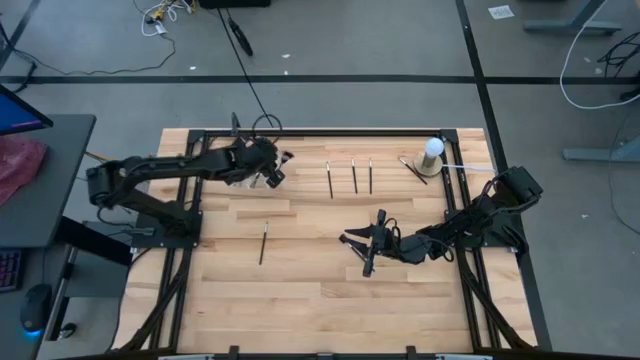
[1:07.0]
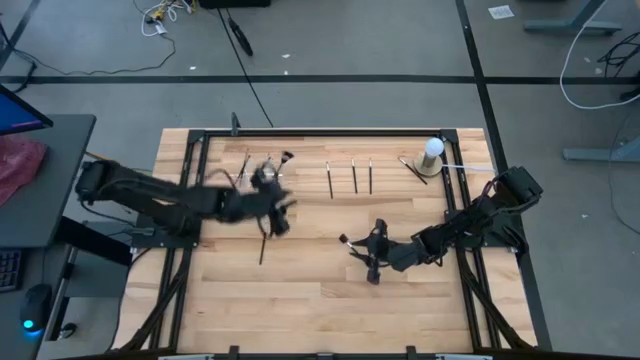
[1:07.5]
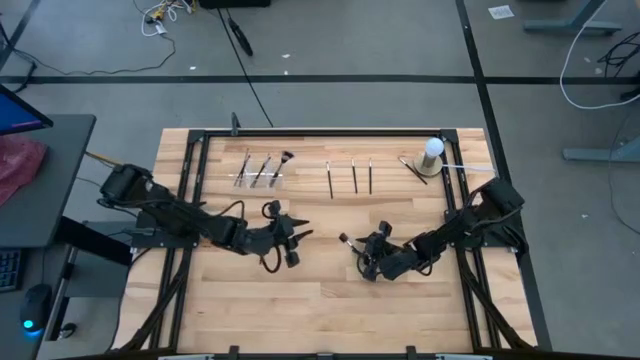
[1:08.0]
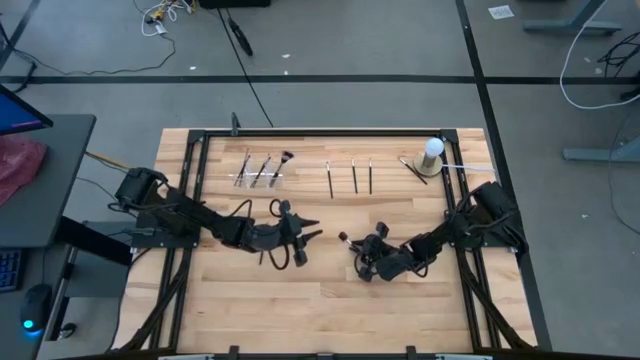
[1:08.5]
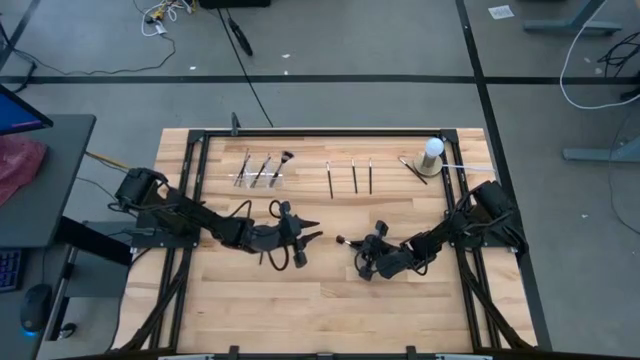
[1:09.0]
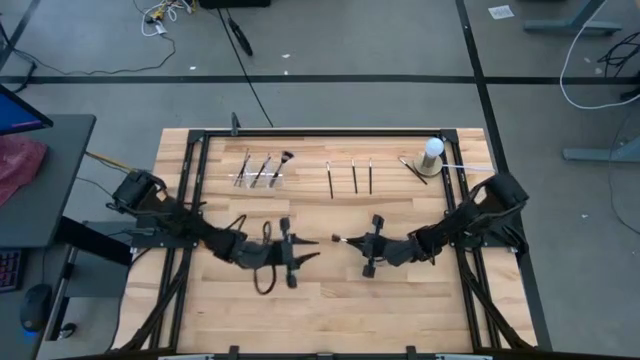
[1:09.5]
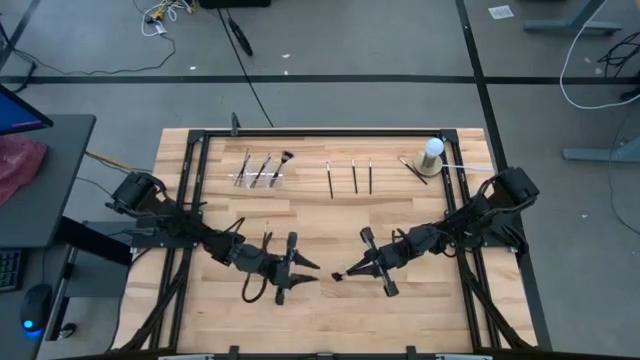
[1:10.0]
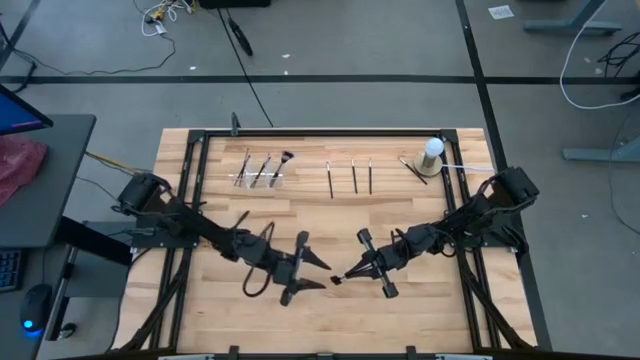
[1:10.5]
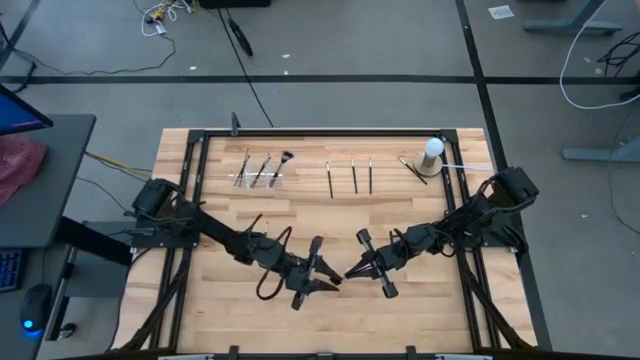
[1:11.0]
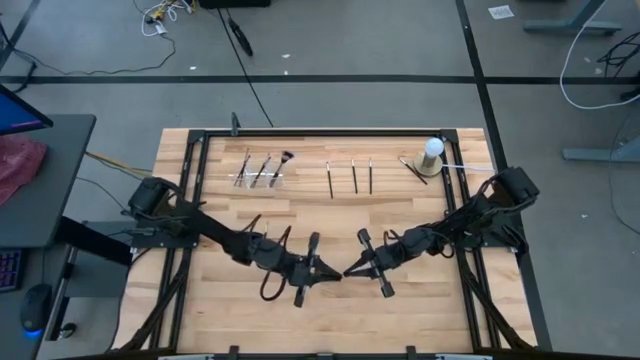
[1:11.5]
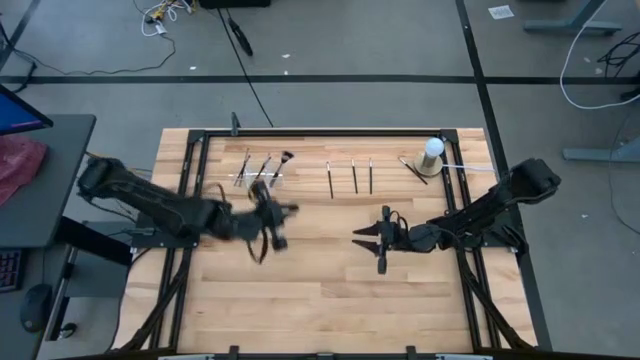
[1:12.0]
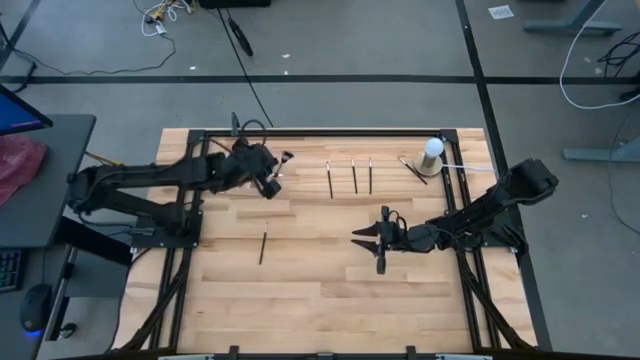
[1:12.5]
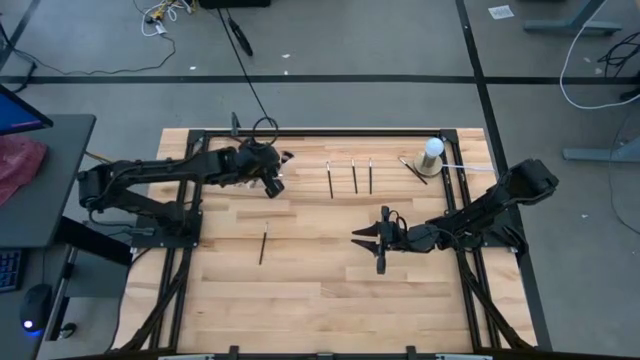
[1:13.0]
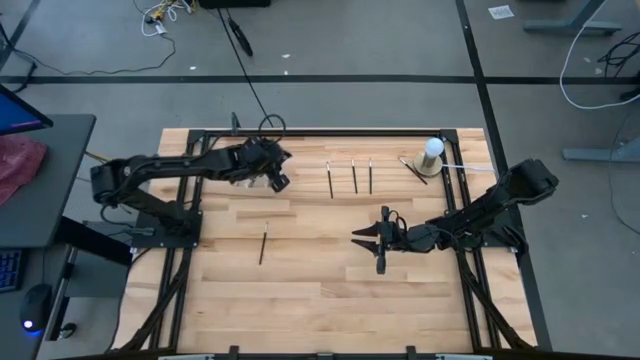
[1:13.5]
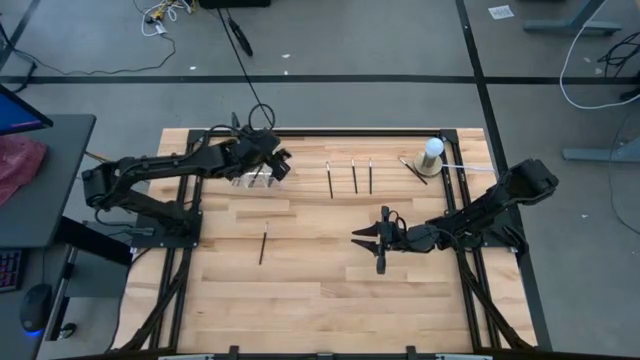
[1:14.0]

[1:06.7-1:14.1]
Task: Put items in baskets/containers
Put the brow brush into the transparent organizer

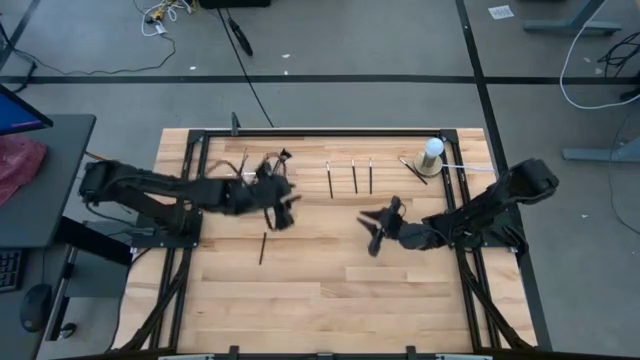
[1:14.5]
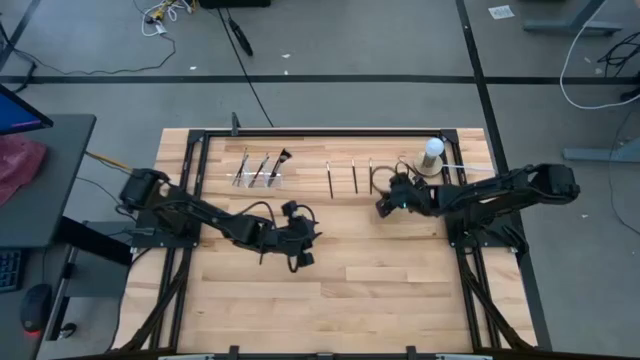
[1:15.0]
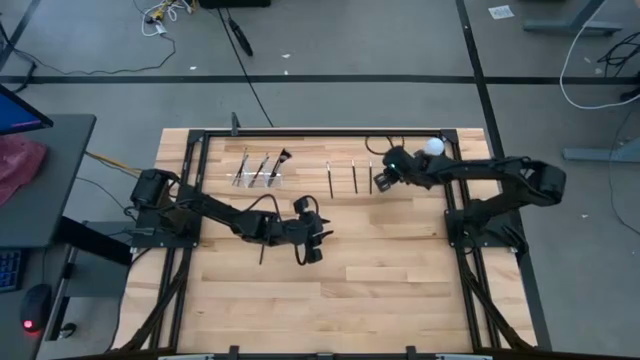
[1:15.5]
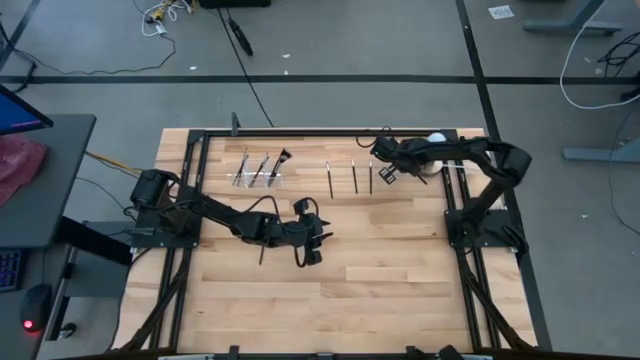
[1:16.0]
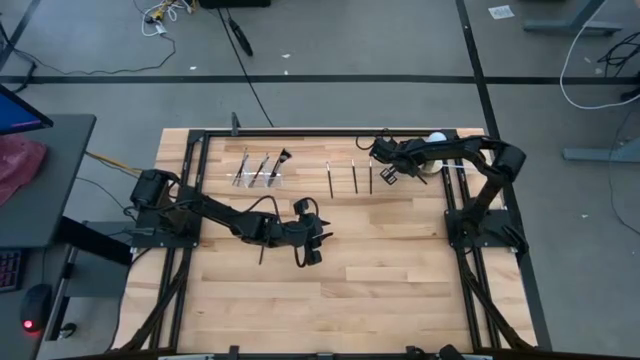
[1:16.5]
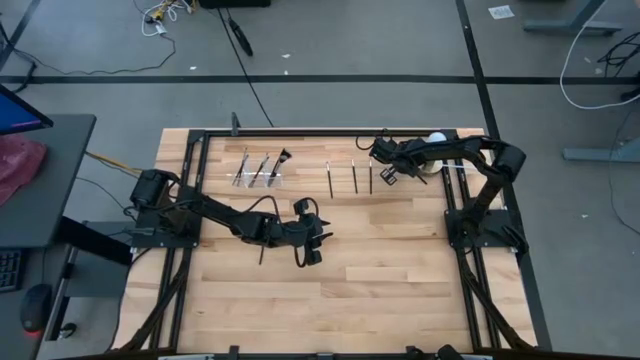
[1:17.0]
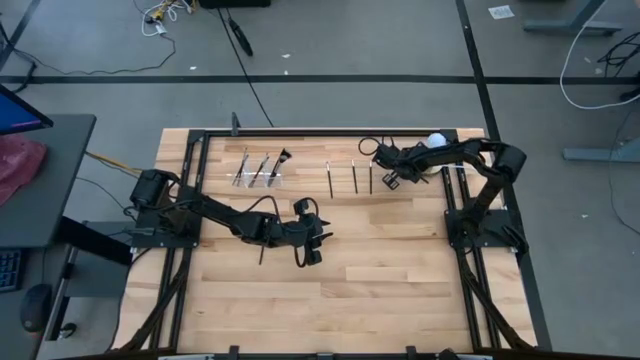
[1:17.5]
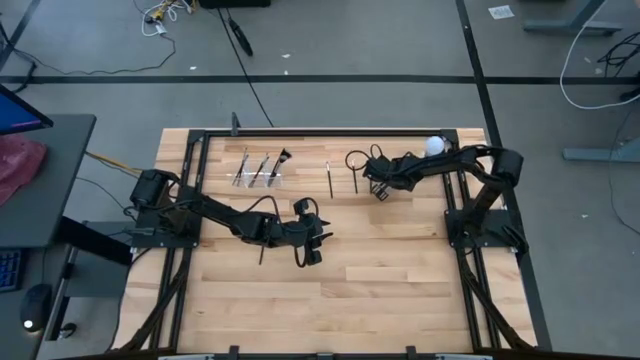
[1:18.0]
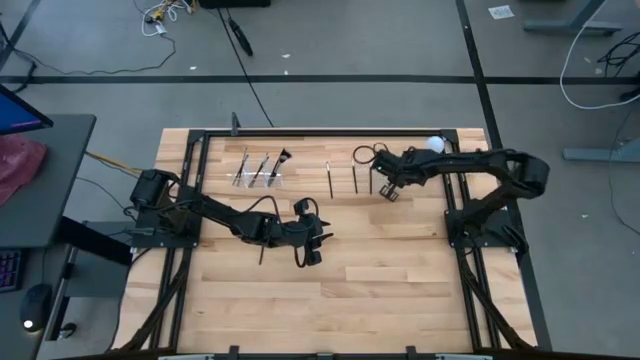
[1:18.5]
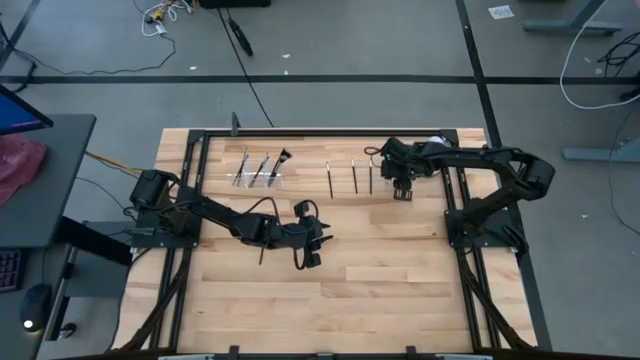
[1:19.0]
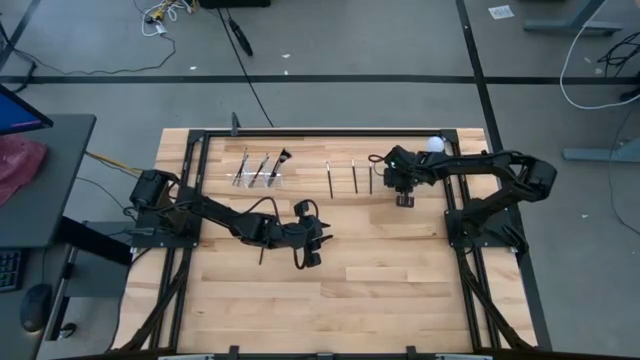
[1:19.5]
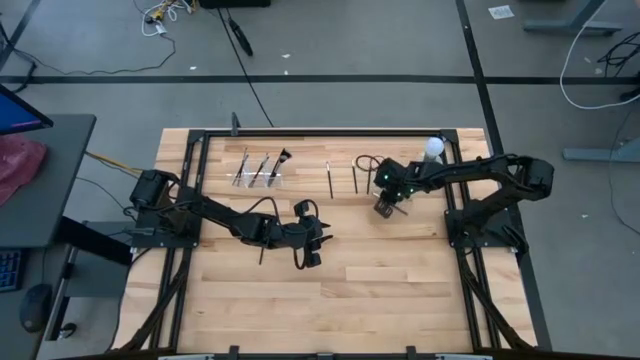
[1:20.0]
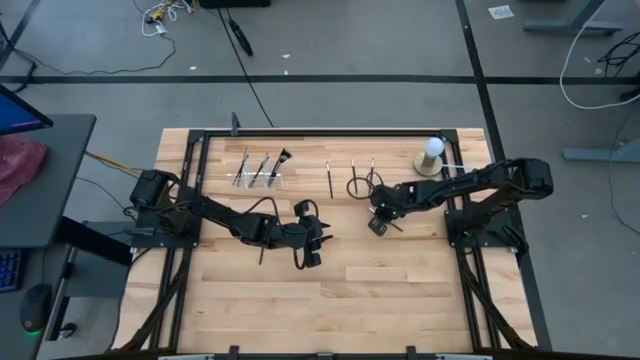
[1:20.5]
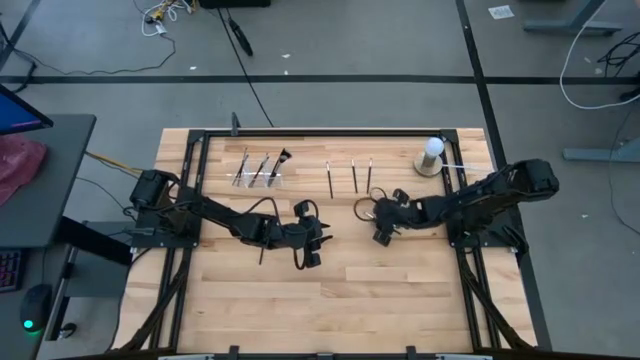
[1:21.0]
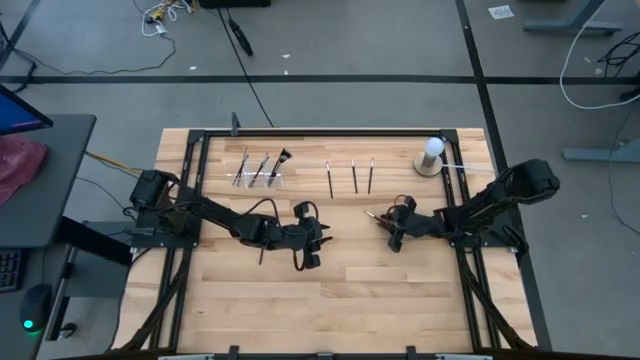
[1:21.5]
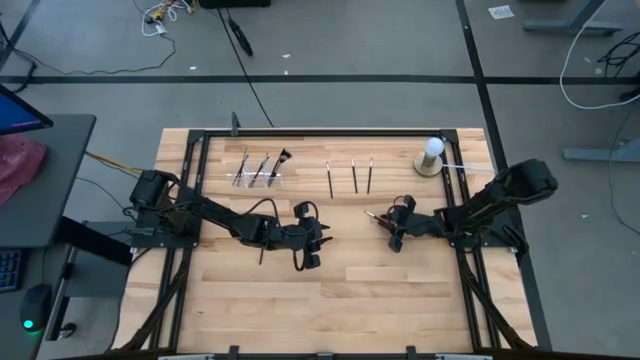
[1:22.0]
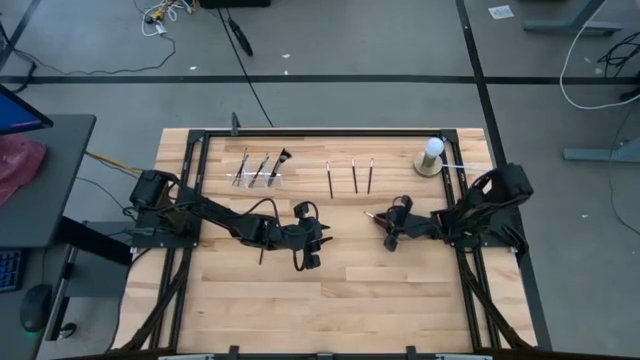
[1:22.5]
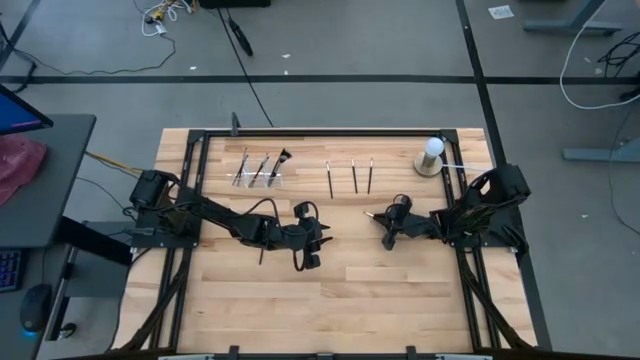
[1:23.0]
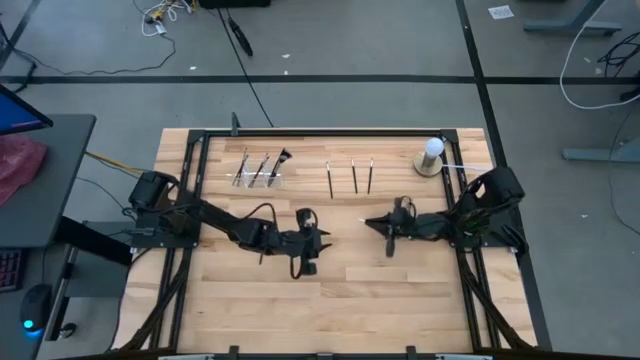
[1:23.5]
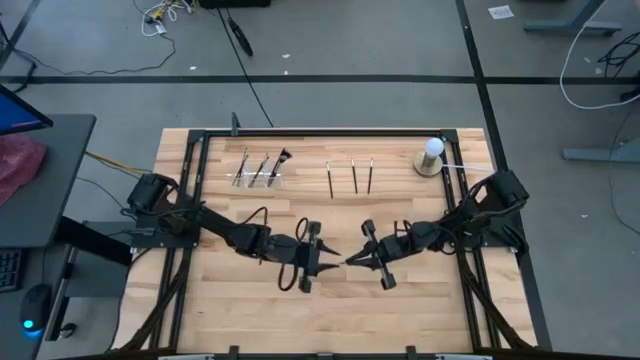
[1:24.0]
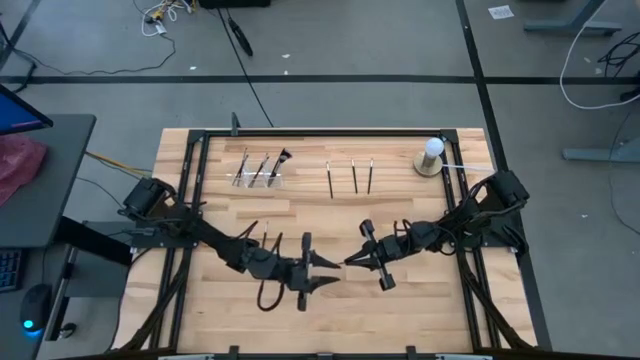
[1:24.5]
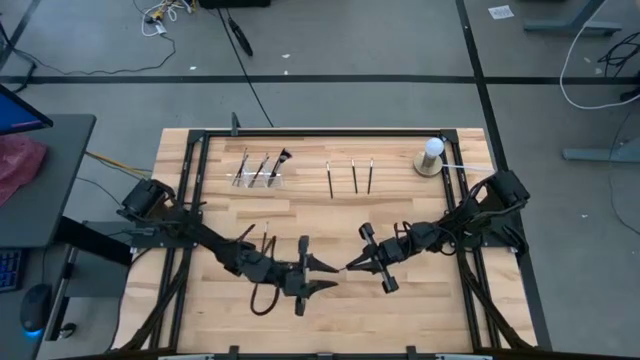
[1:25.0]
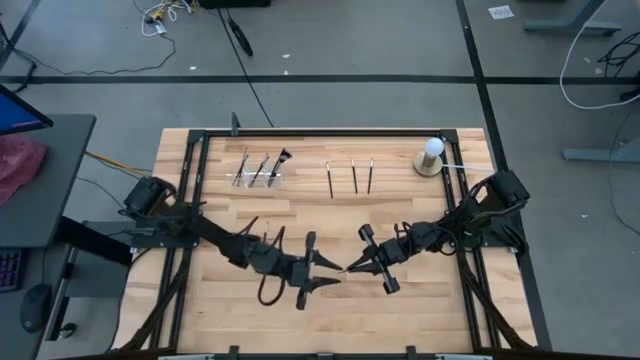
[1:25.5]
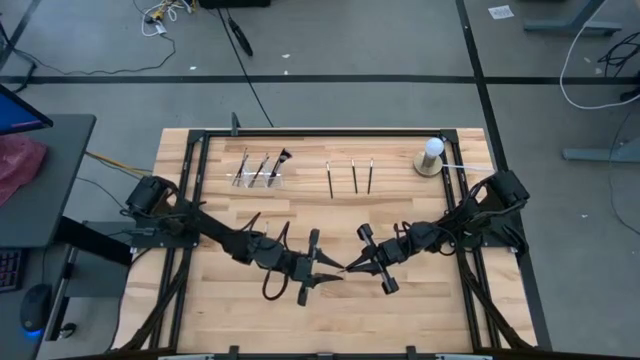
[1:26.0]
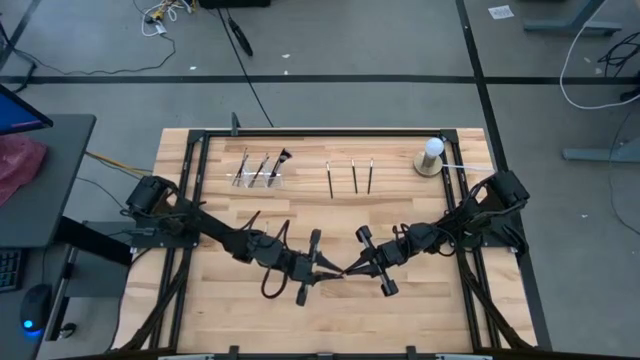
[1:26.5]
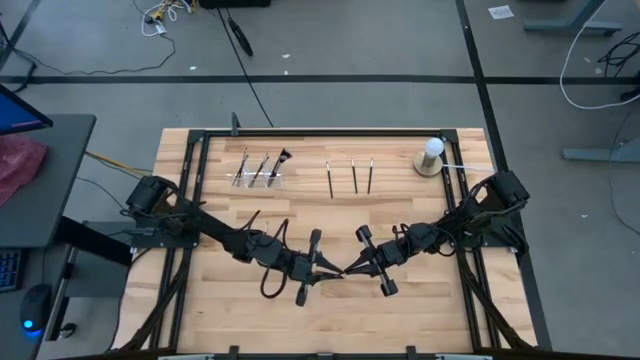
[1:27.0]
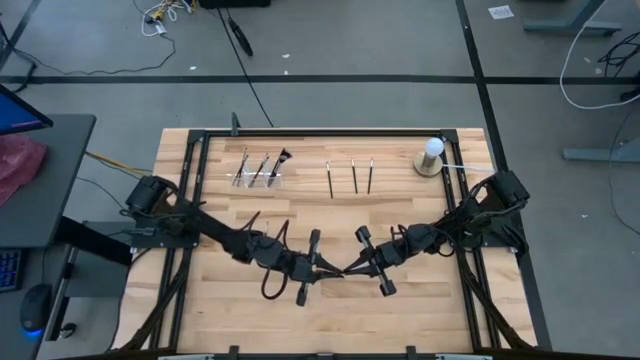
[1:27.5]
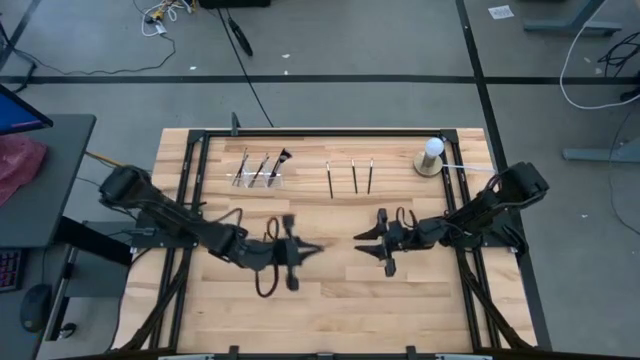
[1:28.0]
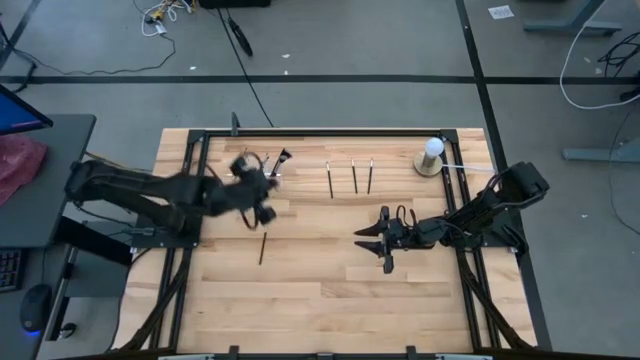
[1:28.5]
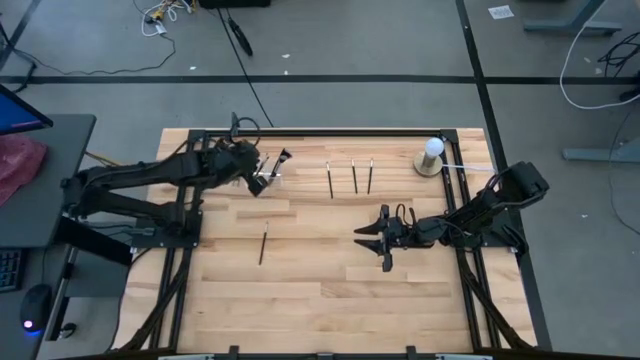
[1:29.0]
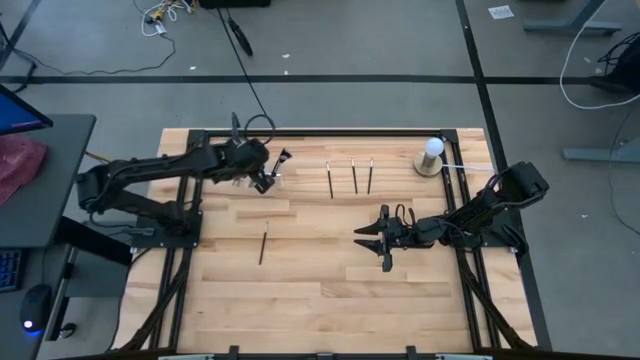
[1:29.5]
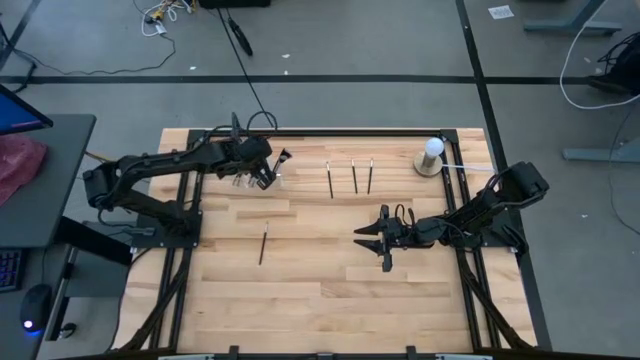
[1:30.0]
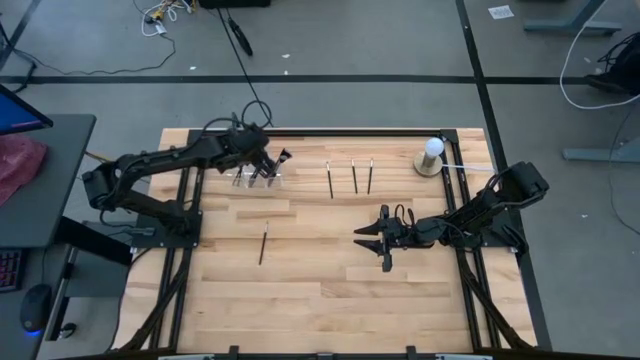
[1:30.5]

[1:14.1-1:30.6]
Put the eyeshadow brush into the transparent organizer
